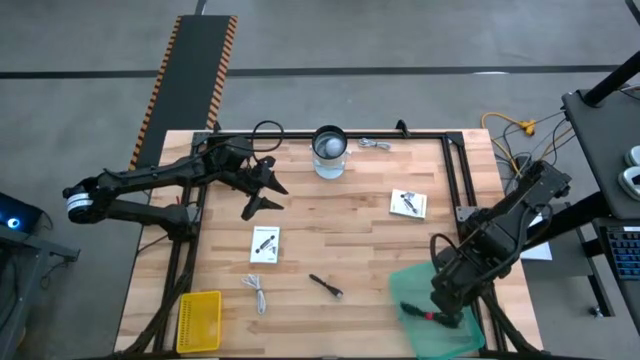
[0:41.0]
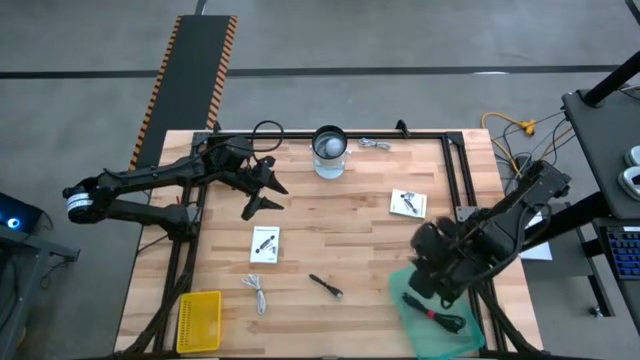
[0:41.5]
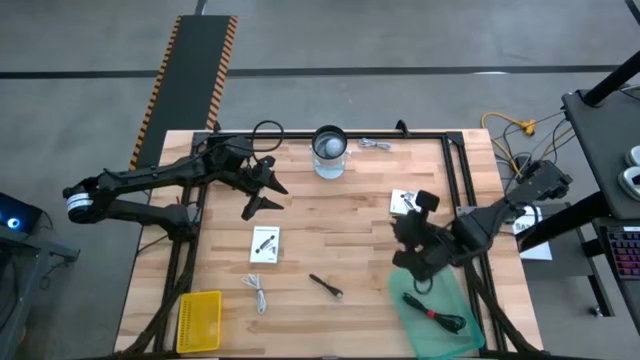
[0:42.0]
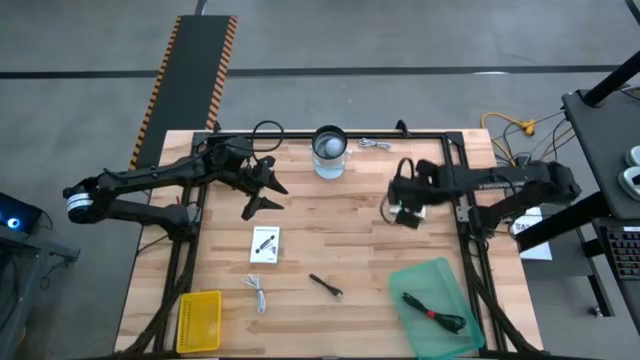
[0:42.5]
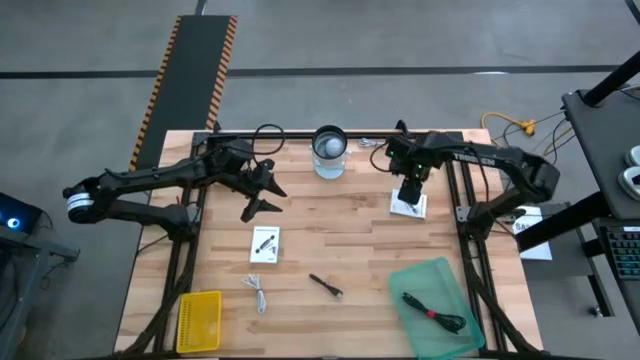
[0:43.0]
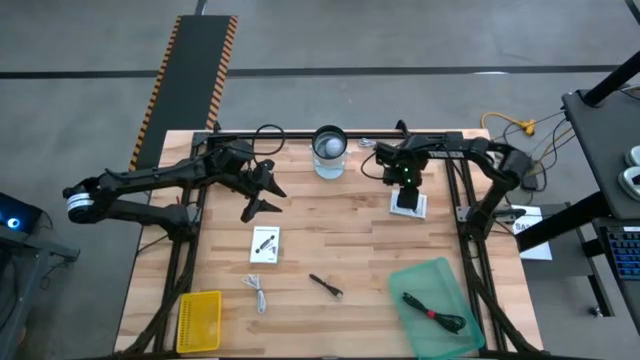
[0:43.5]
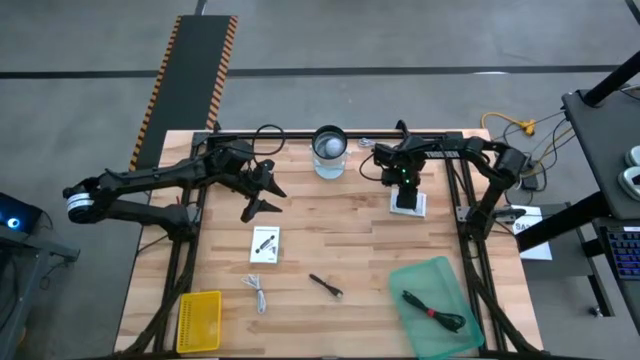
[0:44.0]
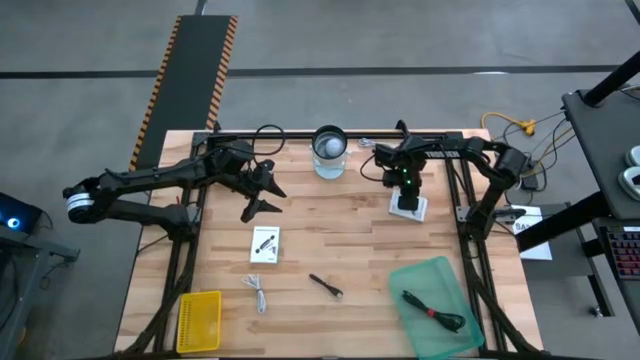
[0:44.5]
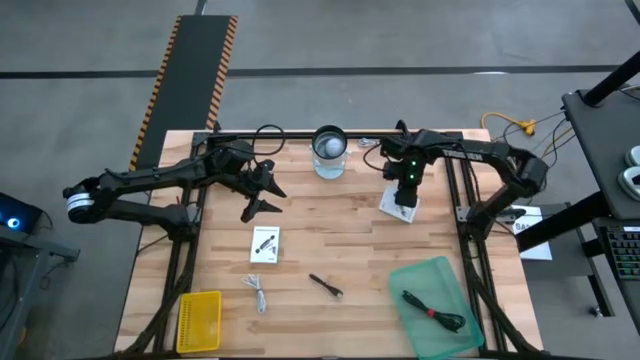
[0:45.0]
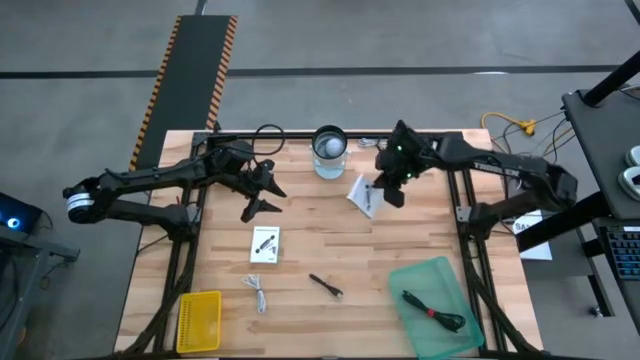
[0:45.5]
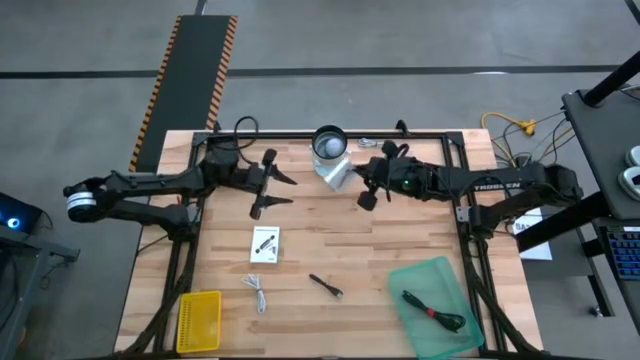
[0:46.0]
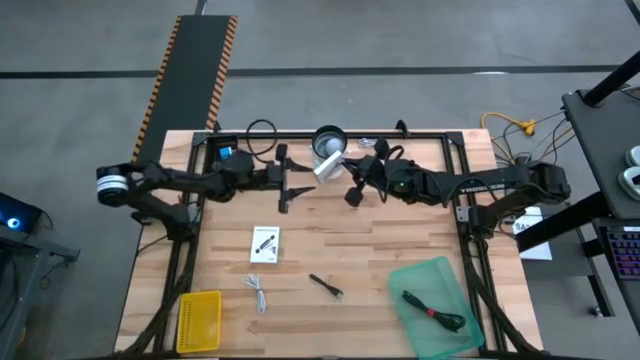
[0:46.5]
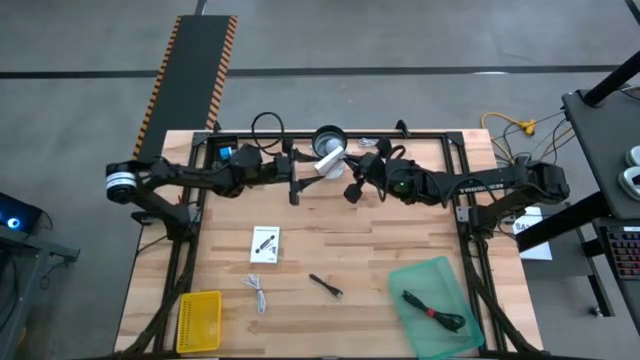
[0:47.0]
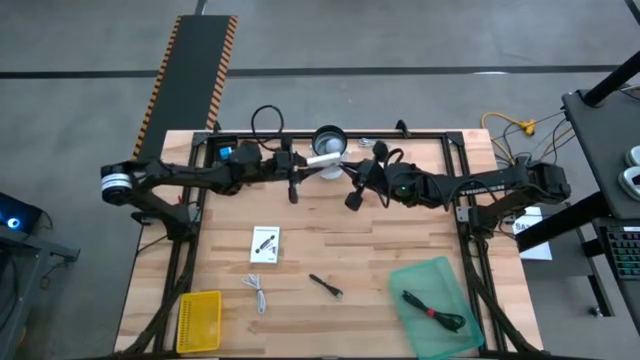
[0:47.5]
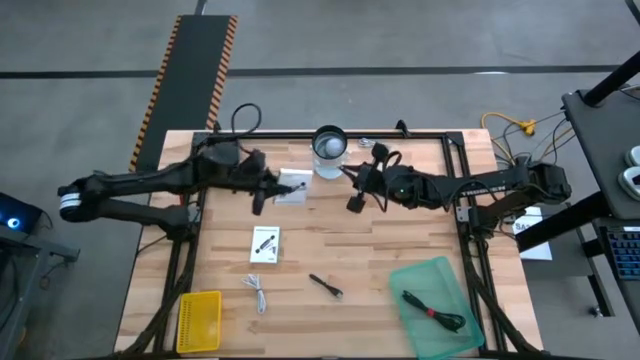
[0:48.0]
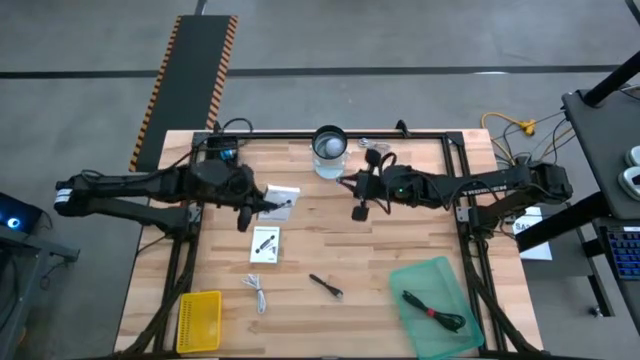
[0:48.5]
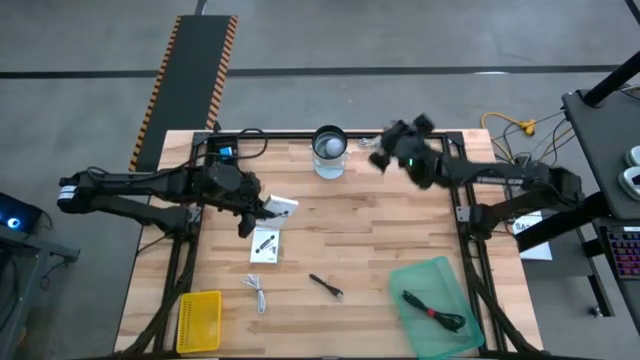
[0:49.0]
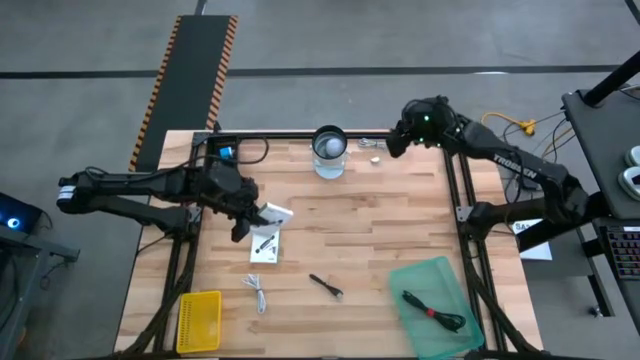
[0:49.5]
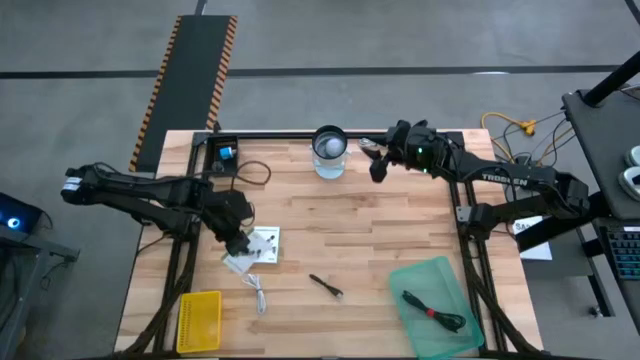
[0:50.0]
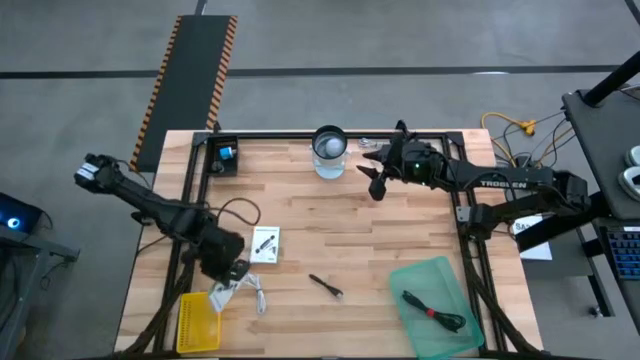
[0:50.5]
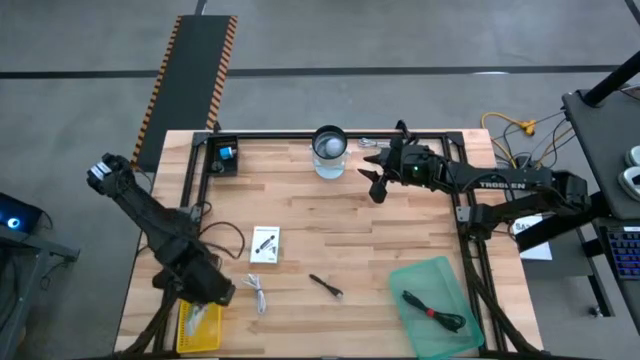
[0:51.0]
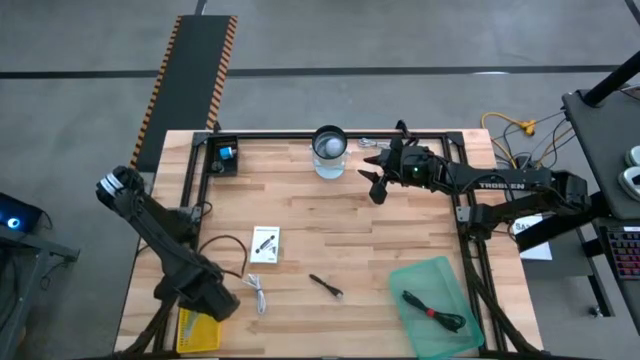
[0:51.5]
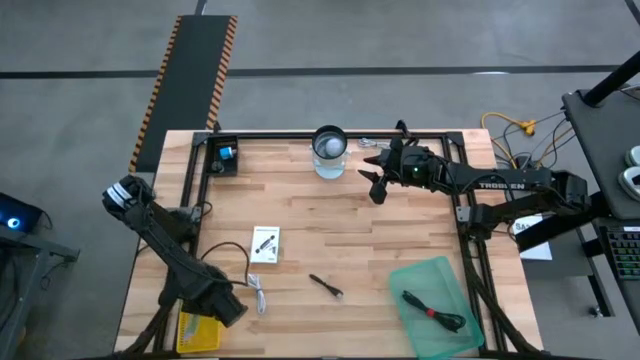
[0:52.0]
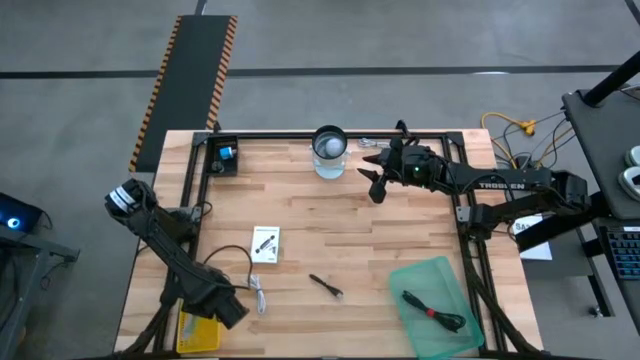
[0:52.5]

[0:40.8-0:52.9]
Task: Pick and place items into bin
Put the right white card reader box into the yellow bin

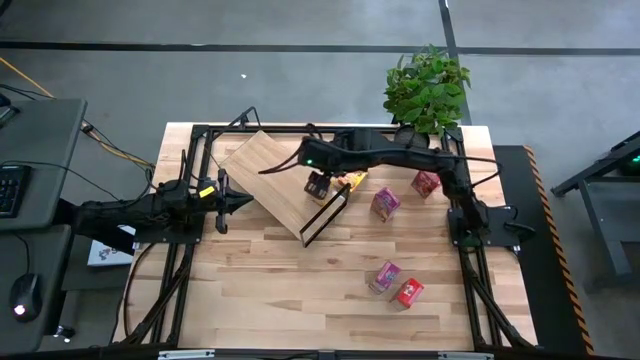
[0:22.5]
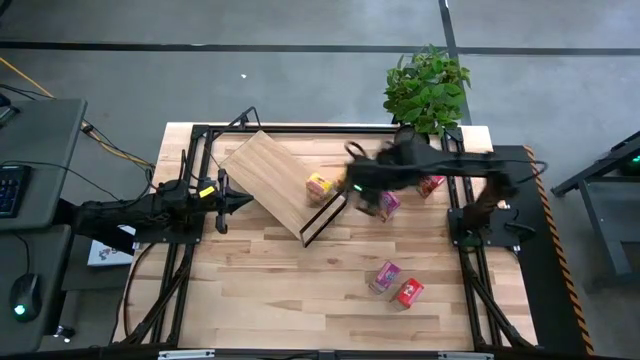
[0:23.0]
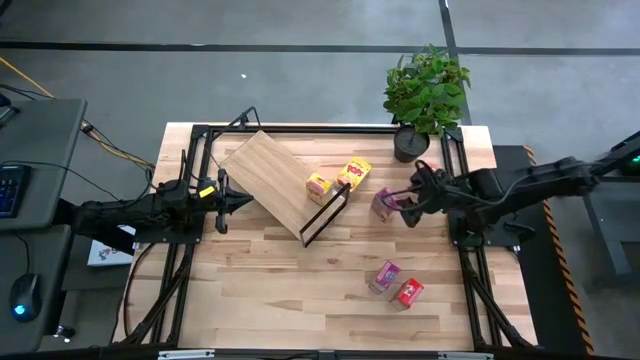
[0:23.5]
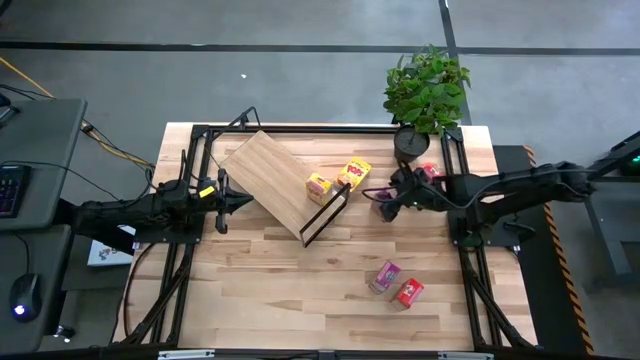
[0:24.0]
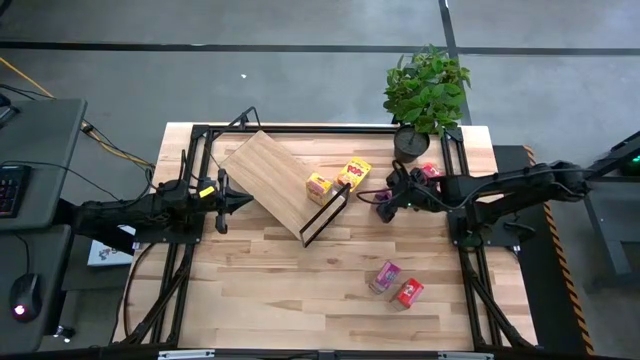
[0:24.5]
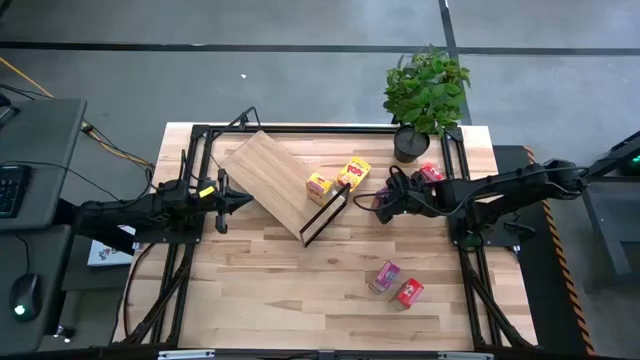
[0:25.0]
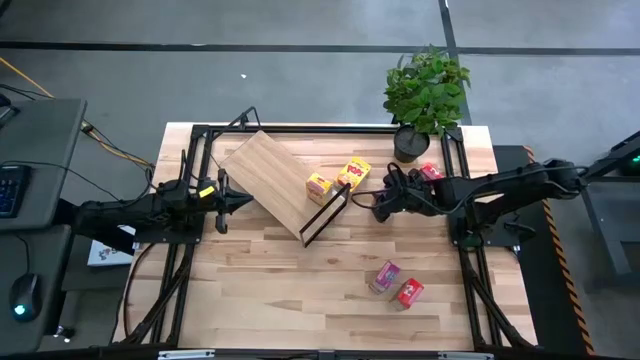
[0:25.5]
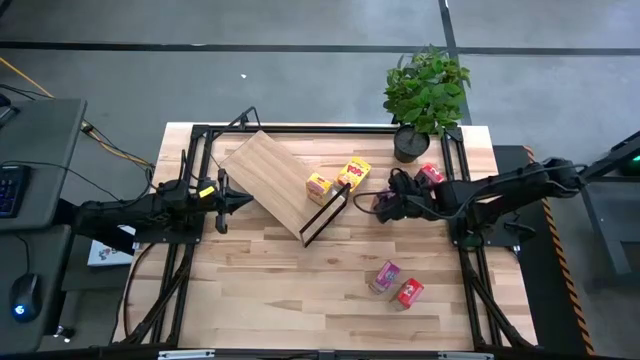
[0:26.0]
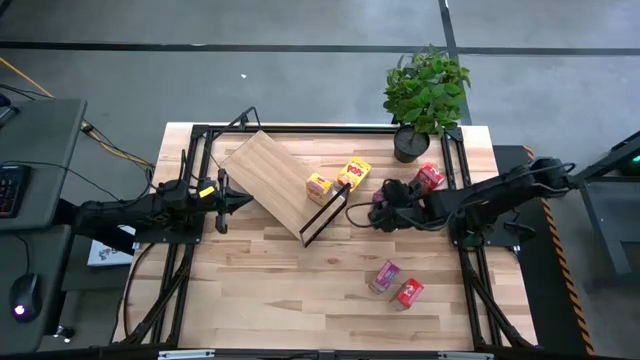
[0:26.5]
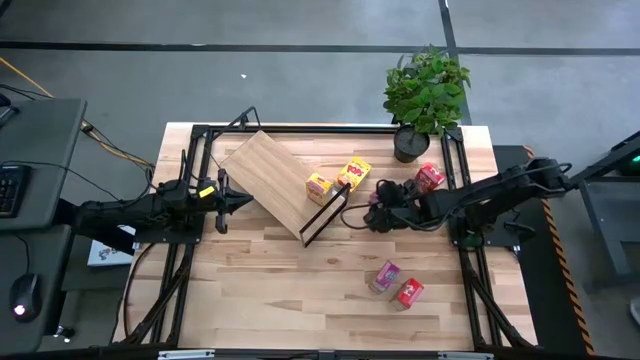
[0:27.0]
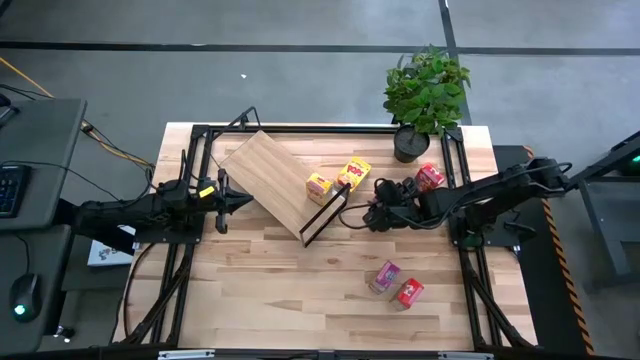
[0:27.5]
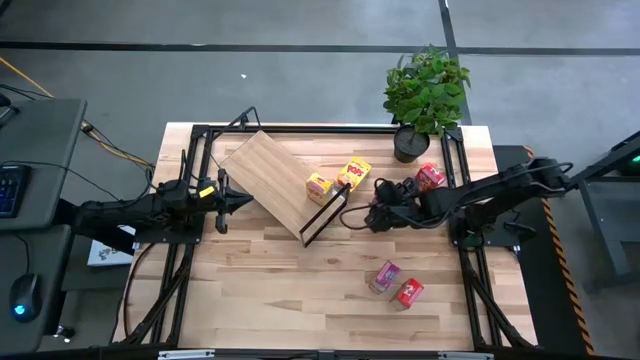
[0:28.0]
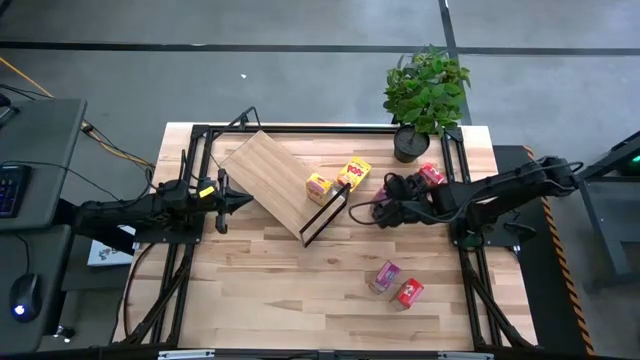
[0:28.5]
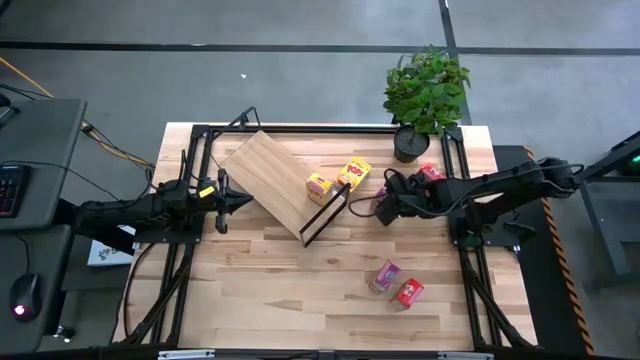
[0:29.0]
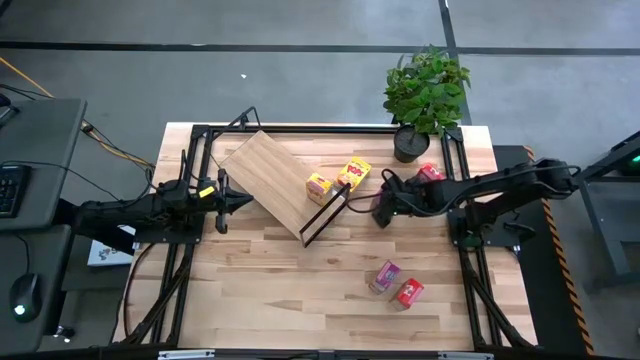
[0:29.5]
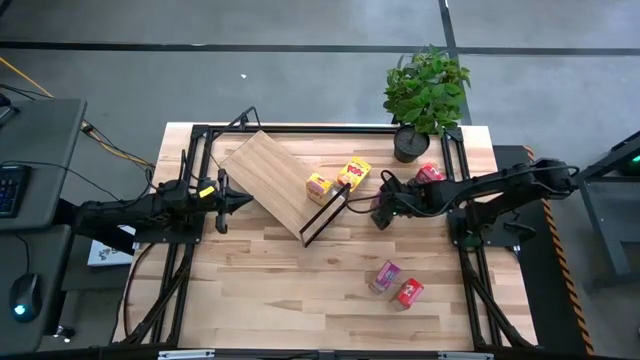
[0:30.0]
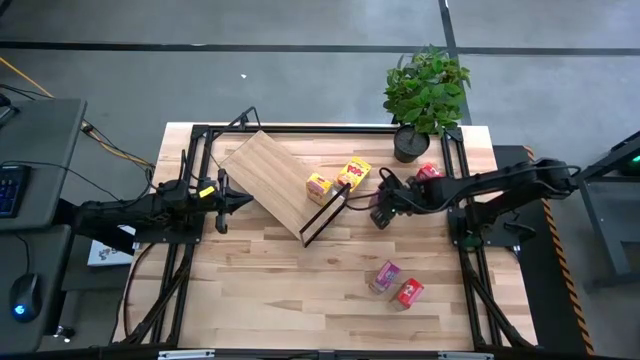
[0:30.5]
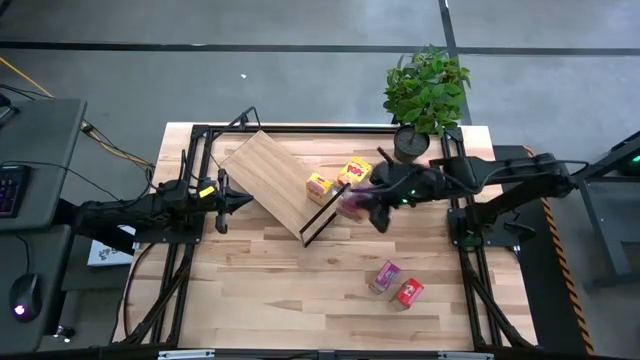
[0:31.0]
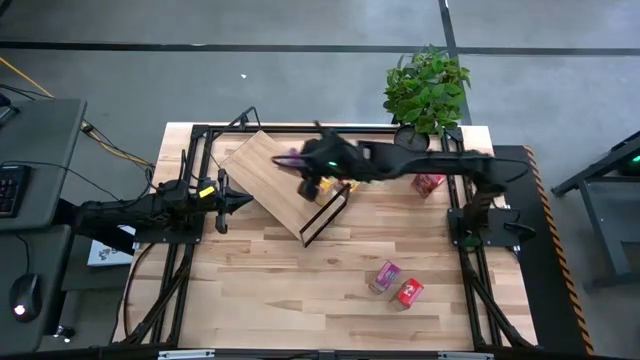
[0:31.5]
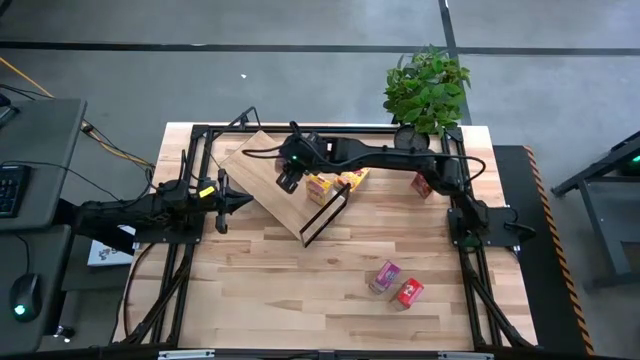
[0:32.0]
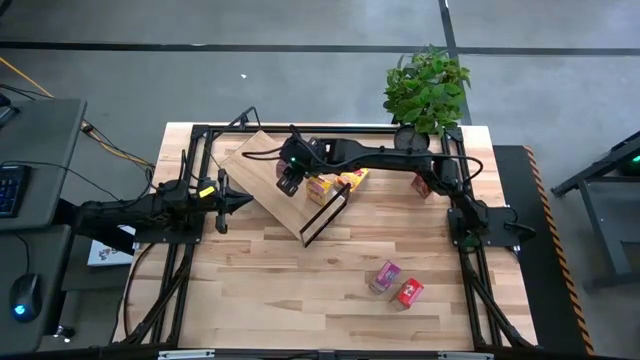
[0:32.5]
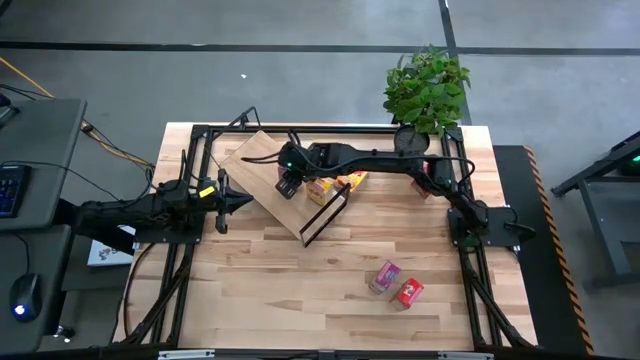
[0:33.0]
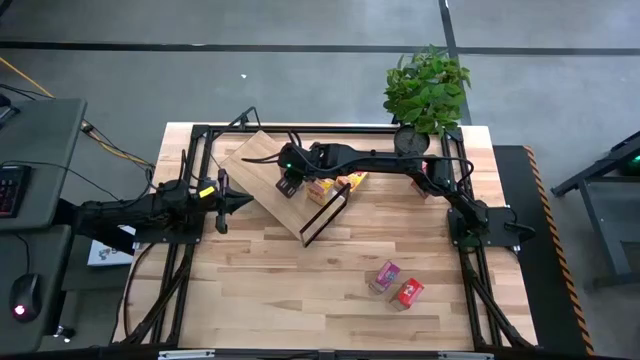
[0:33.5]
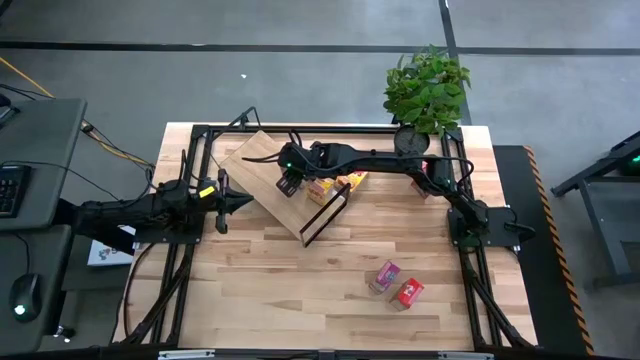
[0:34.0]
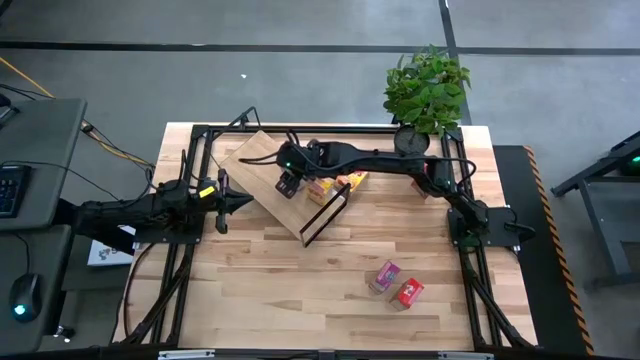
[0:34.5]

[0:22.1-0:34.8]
Task: Stack cereal on shelf
Put the top violet cereal box on the shelf
